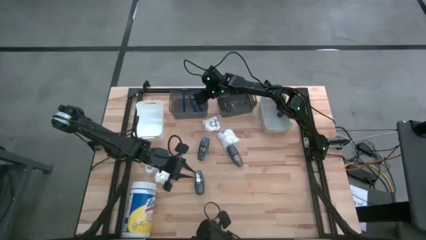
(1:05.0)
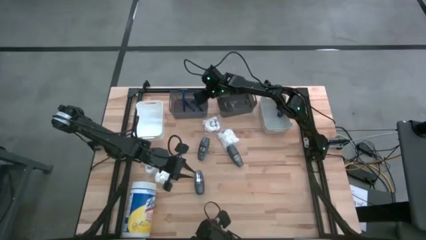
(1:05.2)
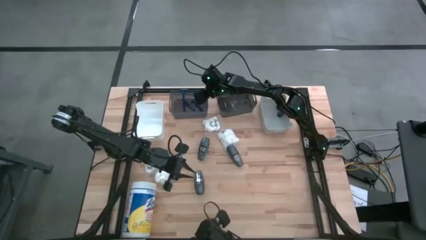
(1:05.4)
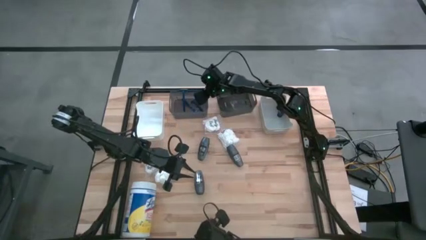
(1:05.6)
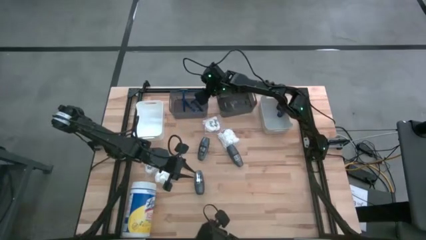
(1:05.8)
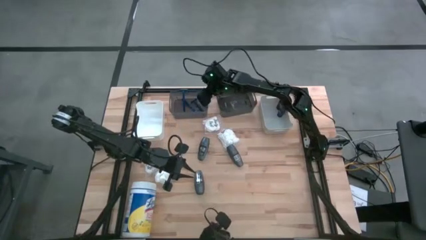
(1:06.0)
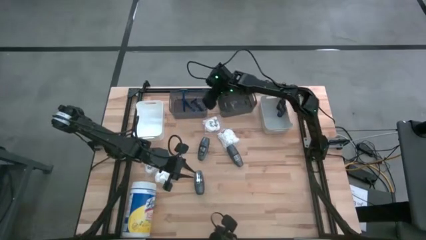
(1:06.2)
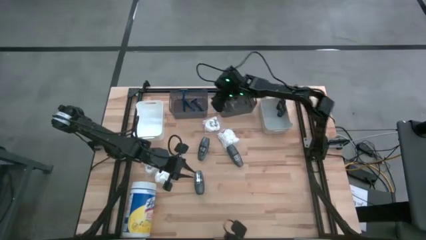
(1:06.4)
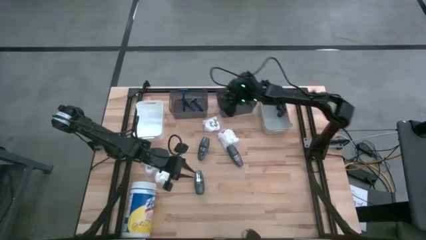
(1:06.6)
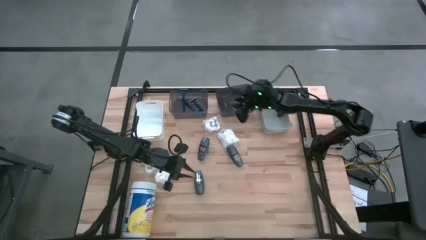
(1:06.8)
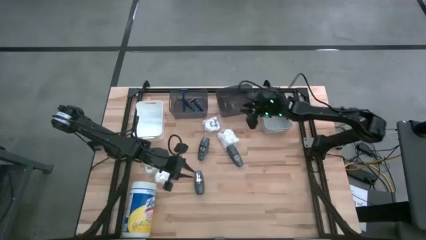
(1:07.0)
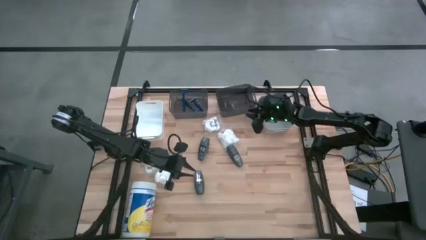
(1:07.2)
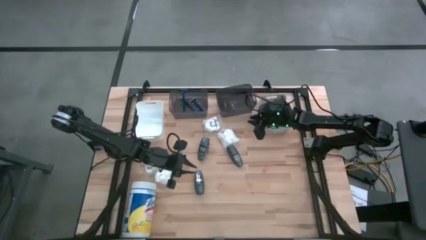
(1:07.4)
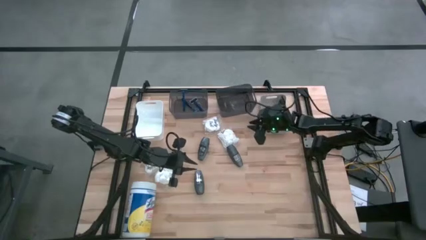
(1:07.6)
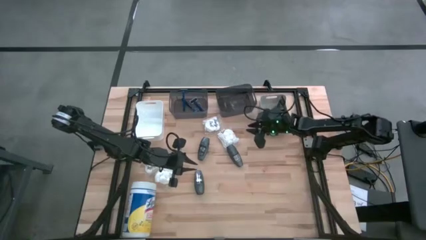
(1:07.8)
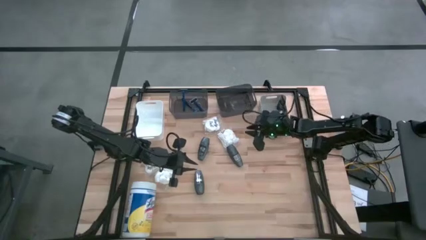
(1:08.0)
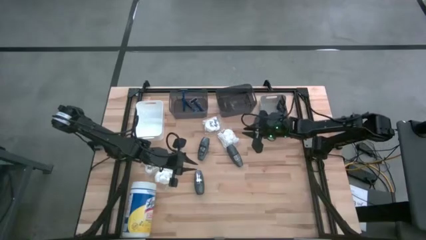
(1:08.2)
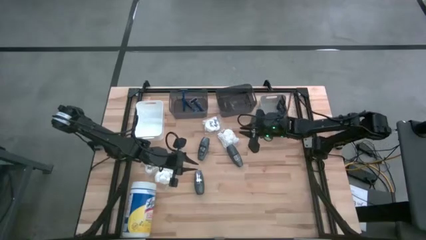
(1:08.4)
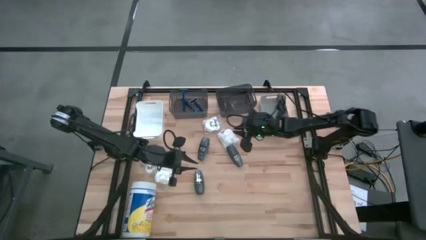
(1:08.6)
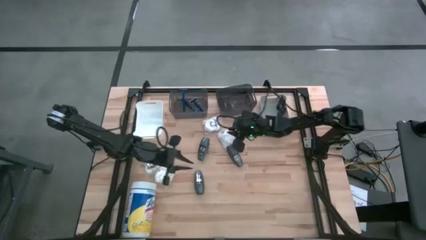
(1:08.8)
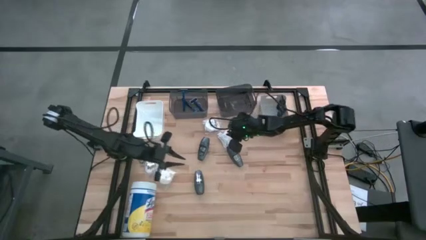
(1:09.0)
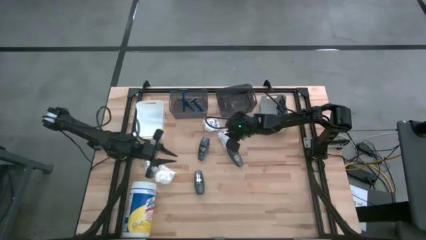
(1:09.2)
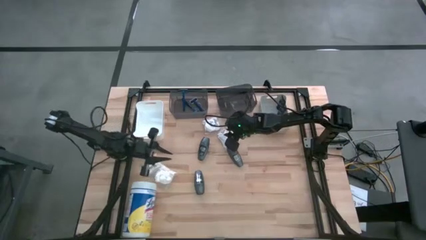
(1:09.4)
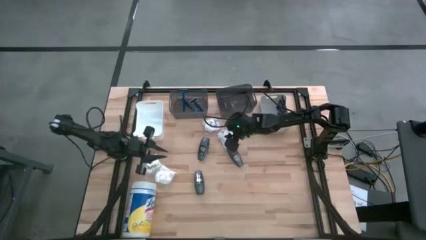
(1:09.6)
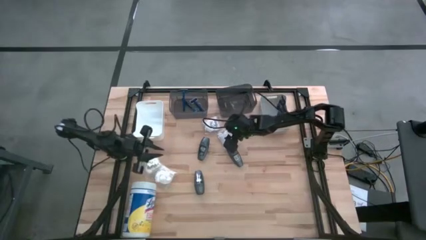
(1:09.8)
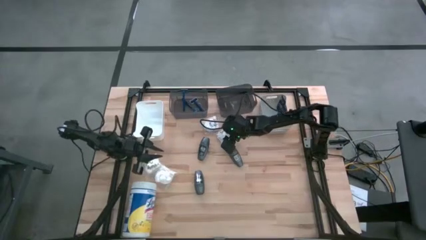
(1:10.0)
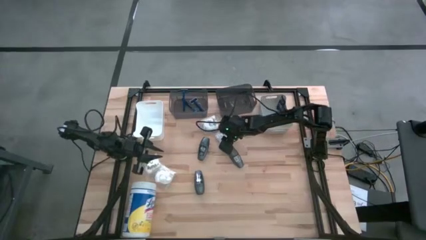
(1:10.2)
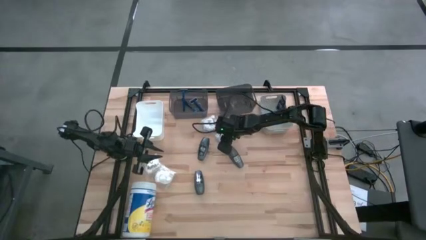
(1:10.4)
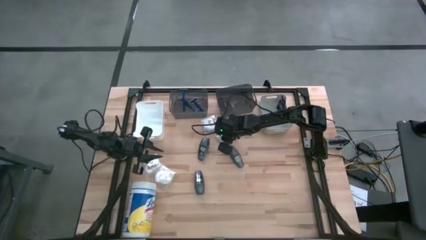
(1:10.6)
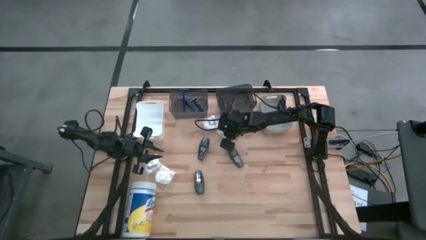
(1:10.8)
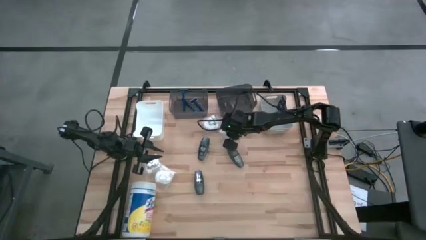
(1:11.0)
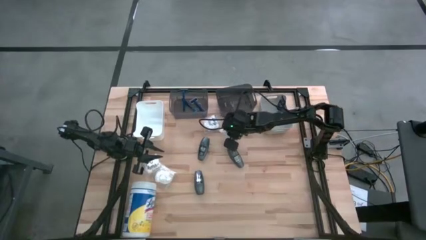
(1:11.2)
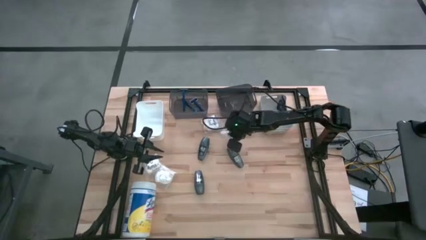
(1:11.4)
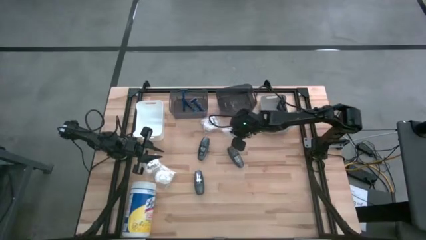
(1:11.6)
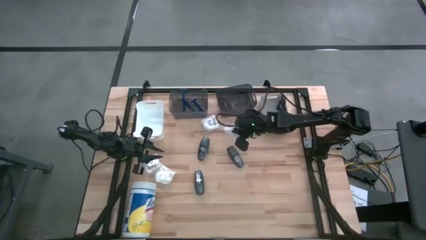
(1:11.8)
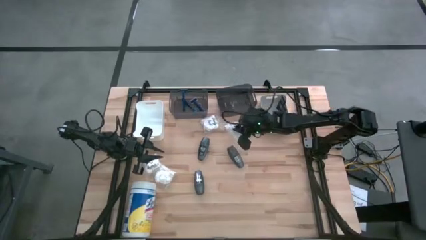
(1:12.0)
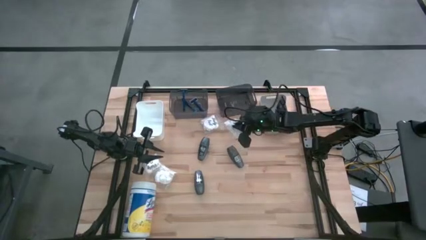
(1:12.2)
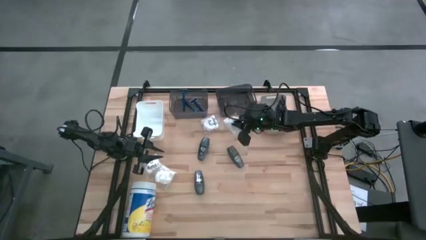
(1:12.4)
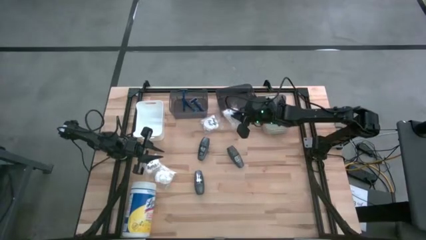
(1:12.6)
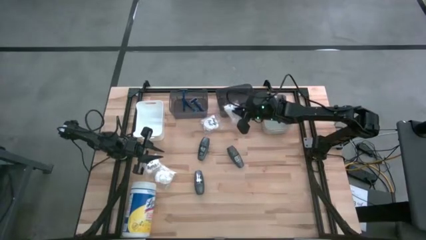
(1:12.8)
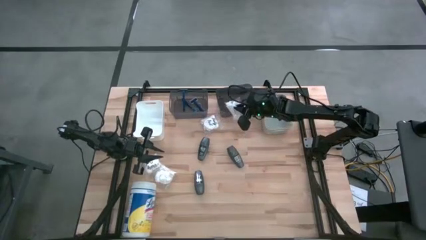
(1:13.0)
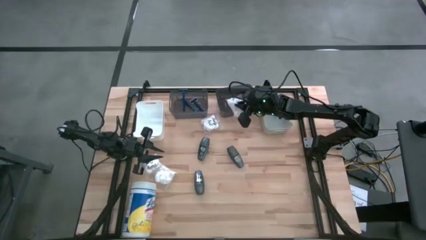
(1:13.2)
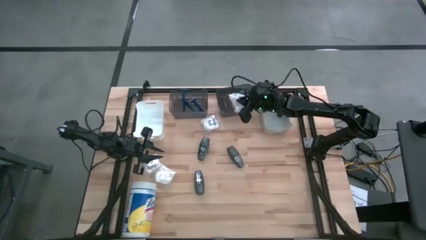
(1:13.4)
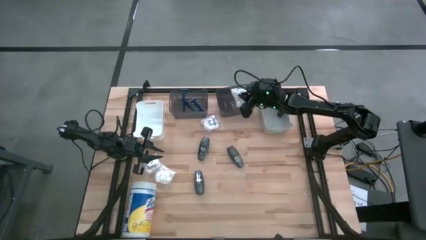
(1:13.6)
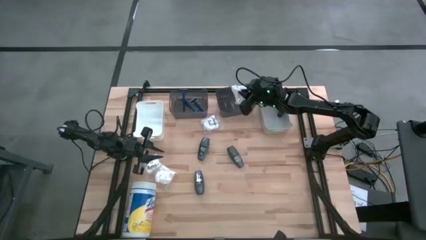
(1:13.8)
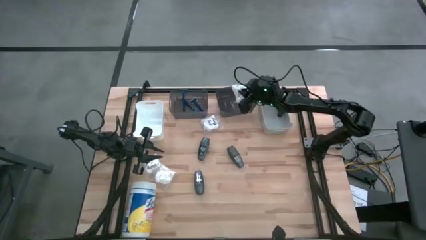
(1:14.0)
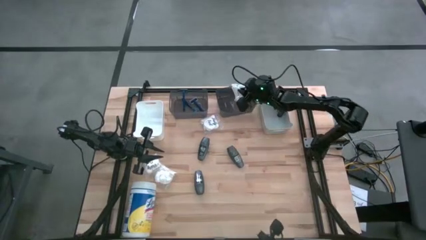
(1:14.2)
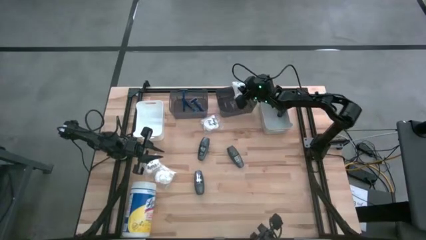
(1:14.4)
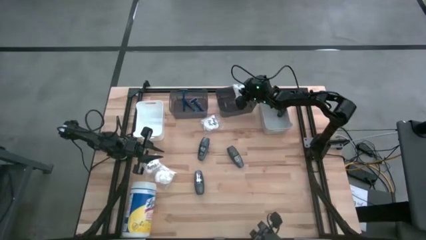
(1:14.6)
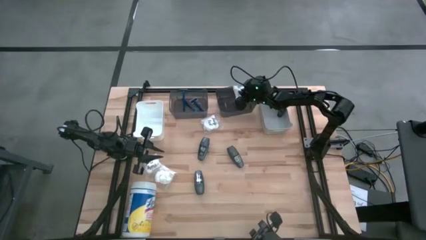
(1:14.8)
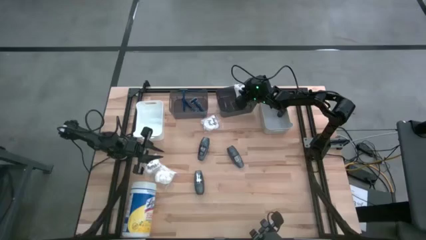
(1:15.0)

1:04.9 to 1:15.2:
Task: Pick & Place Travel size toiletries
Put the white cotton pack into the right black bin

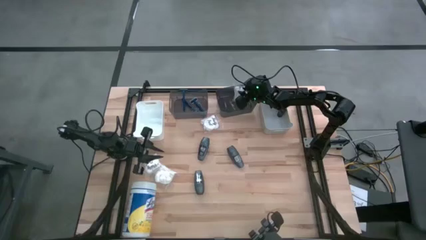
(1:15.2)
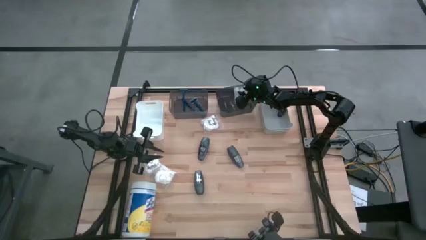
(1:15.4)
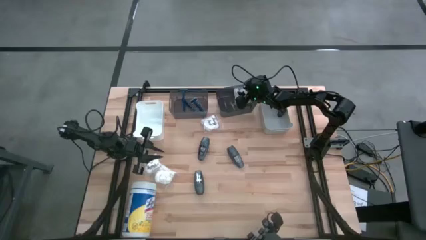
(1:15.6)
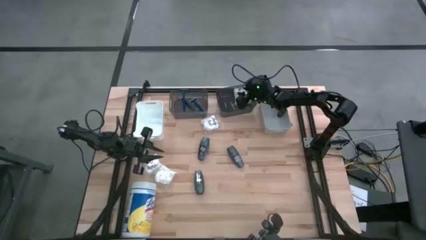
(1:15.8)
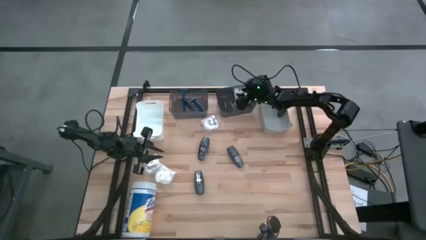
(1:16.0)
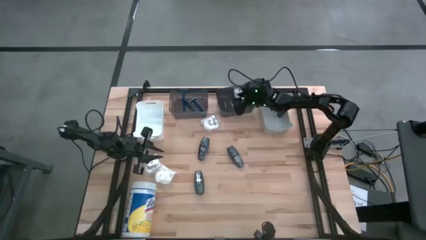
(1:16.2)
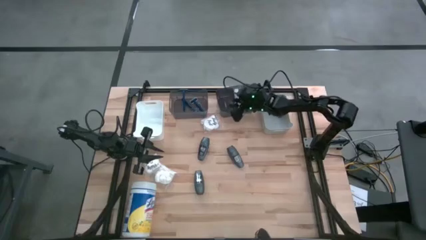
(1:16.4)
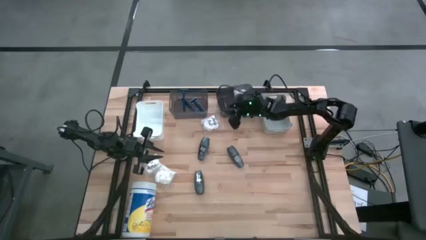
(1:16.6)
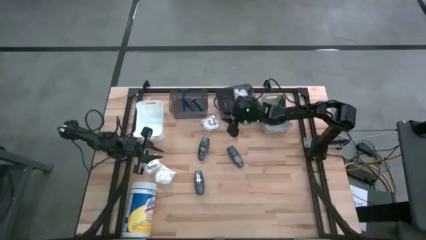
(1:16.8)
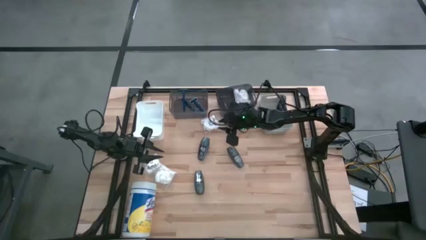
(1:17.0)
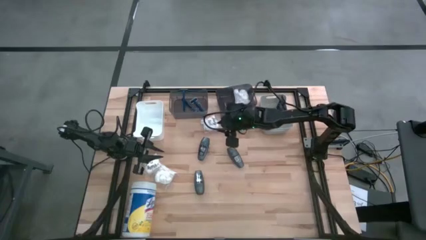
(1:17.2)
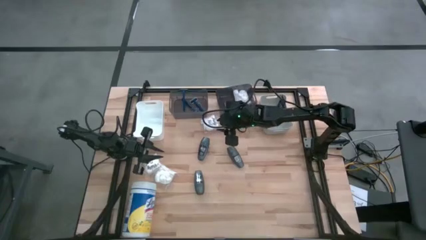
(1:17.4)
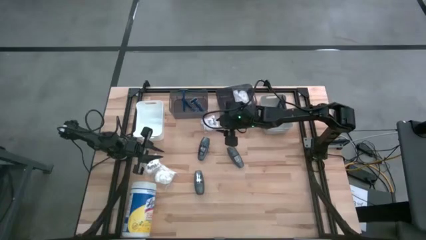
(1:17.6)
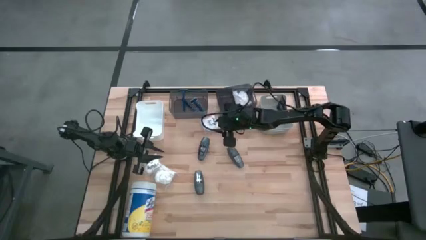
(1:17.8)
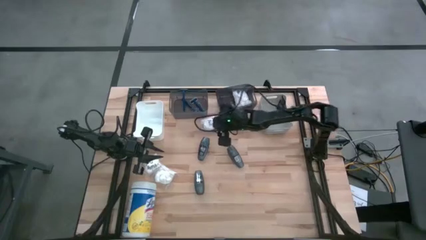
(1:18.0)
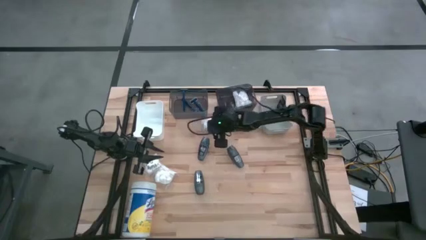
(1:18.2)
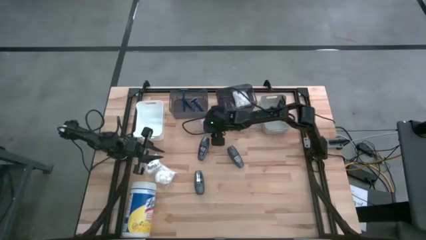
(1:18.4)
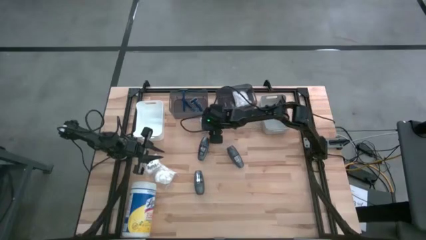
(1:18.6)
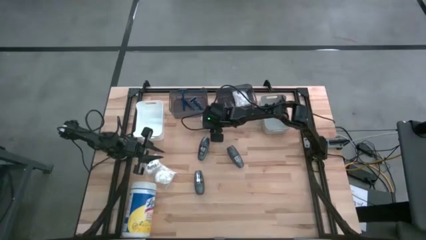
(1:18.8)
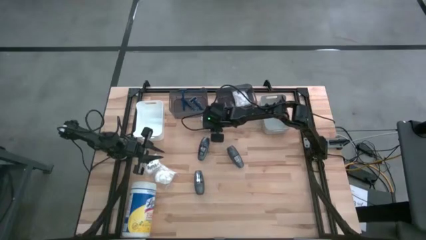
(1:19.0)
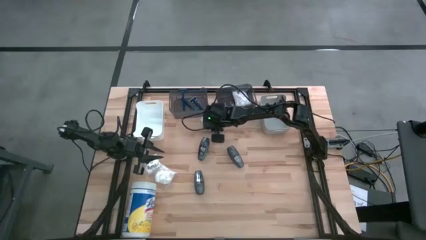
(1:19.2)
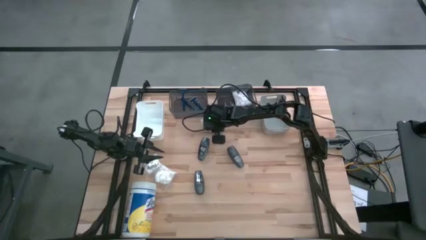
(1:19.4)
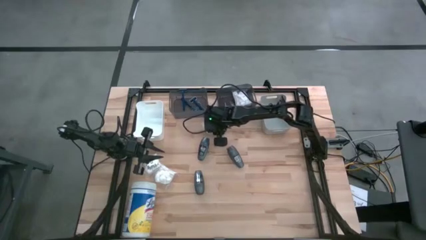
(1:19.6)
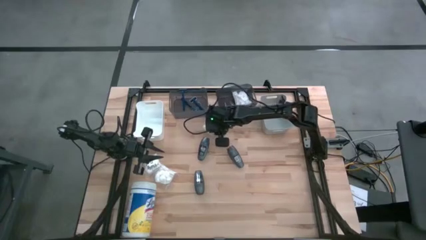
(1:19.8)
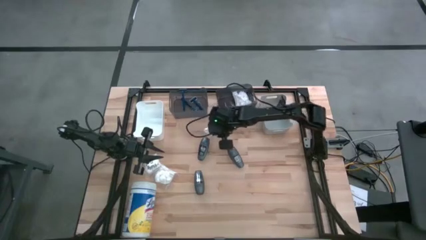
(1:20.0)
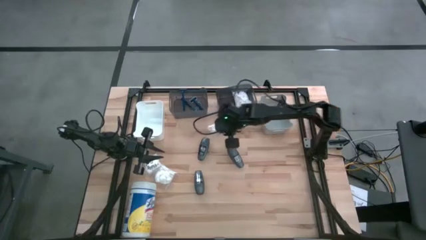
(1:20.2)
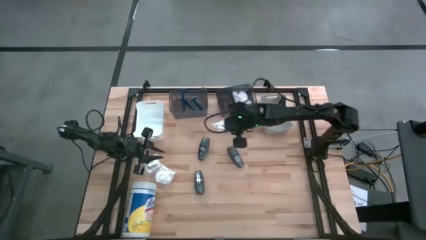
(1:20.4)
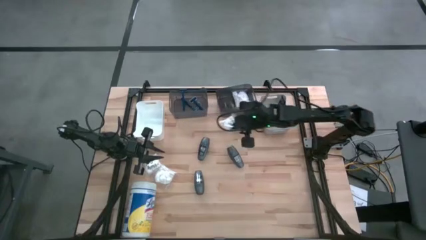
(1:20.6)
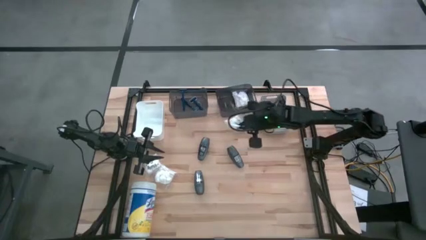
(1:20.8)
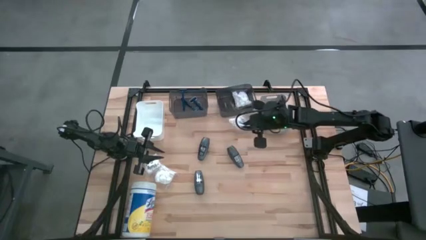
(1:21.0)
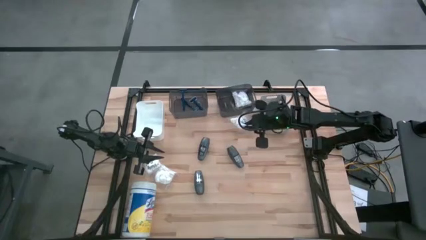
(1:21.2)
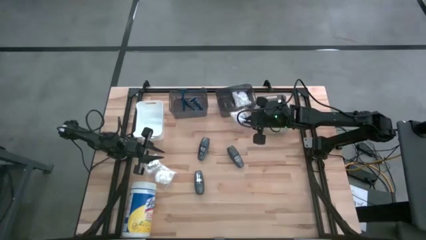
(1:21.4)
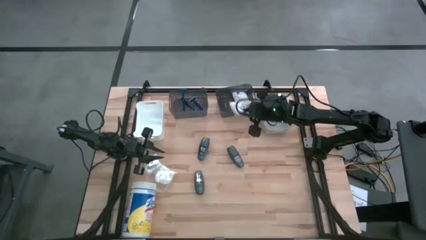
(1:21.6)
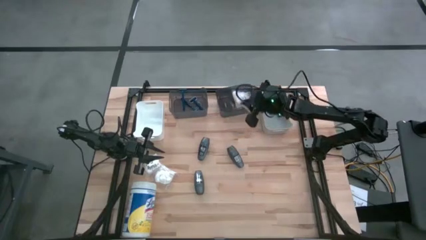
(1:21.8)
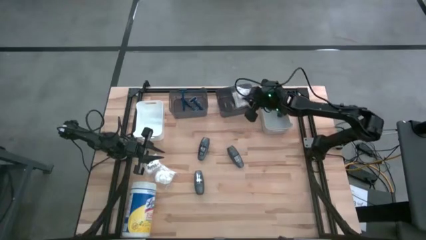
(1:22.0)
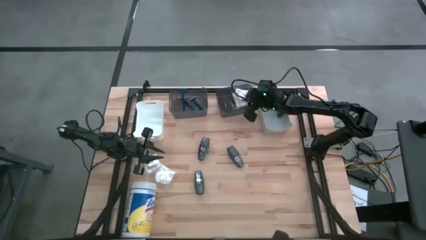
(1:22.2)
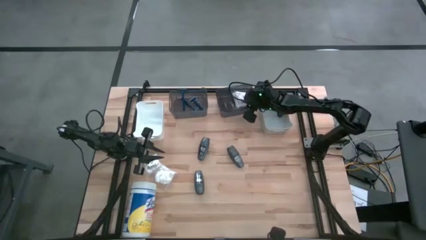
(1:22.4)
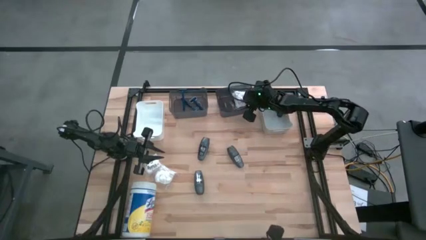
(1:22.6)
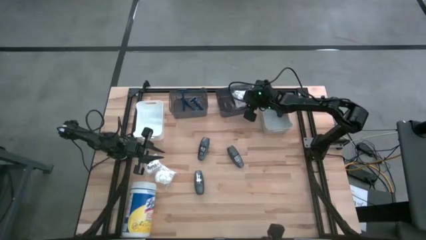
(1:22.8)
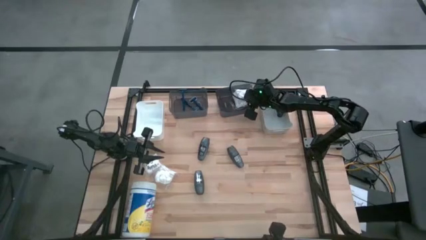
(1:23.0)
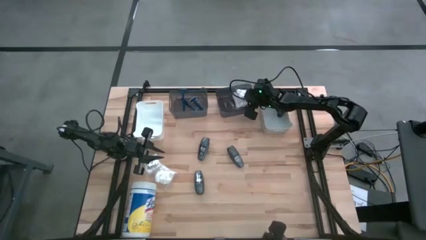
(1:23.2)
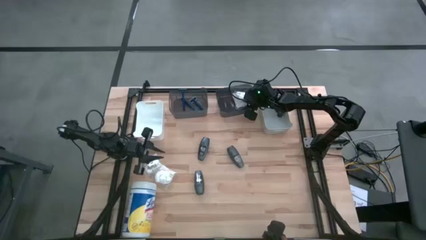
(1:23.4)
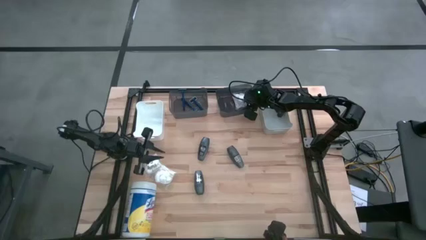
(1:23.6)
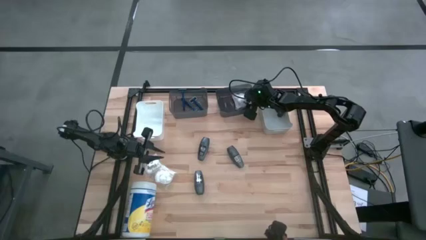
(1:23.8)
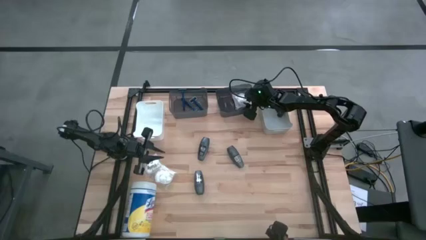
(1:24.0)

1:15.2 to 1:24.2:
Put the white cotton pack into the right black bin
